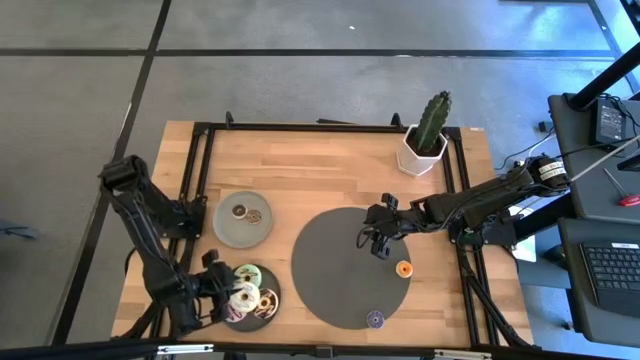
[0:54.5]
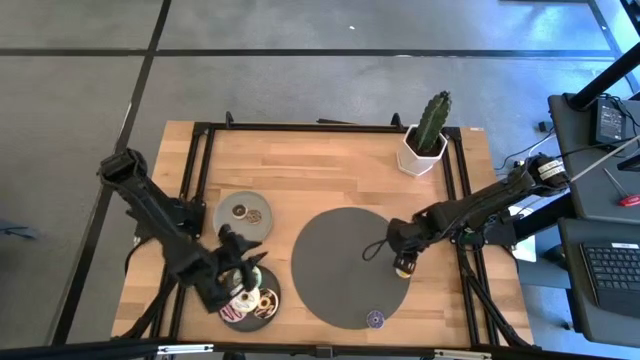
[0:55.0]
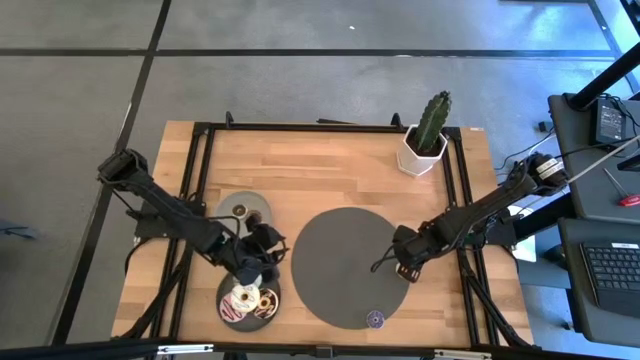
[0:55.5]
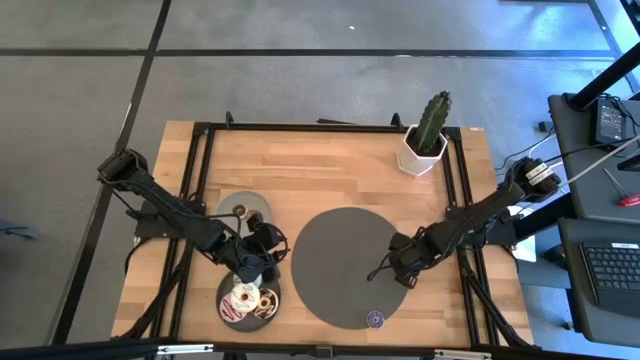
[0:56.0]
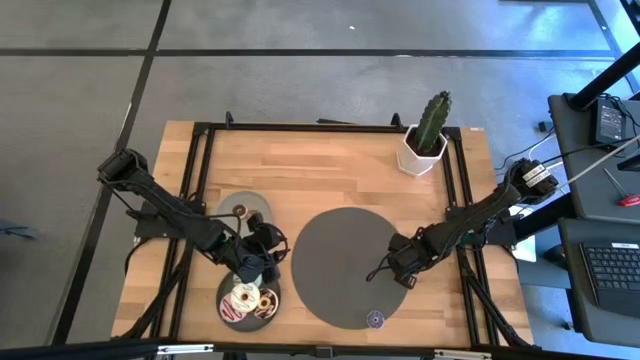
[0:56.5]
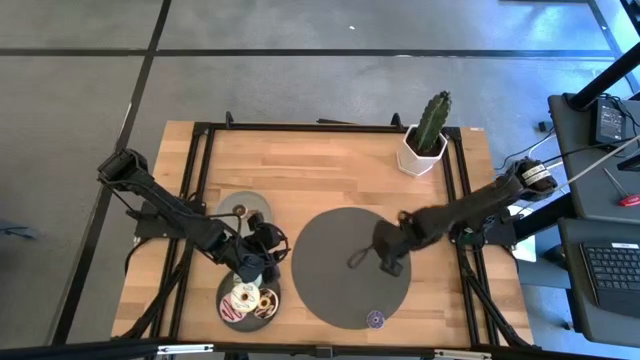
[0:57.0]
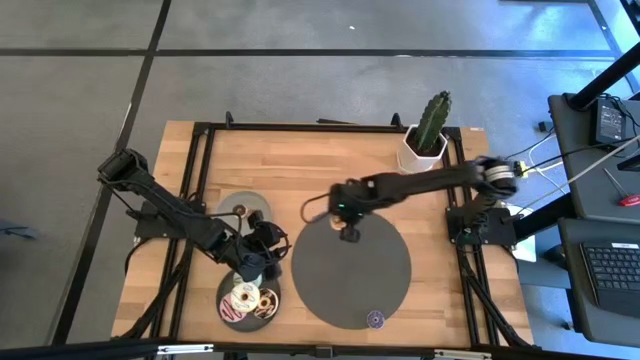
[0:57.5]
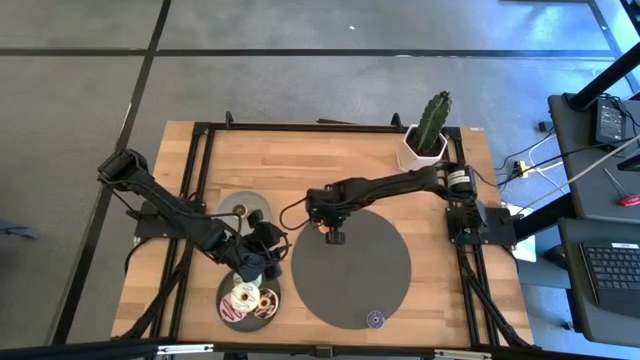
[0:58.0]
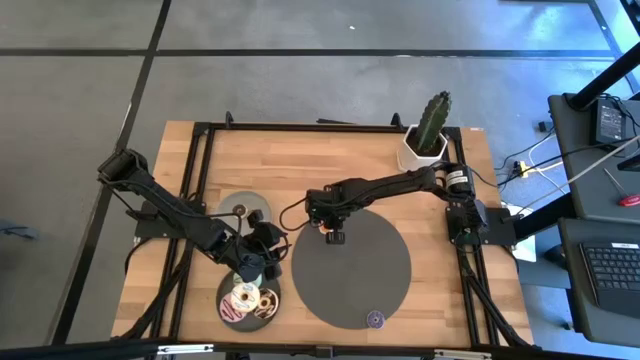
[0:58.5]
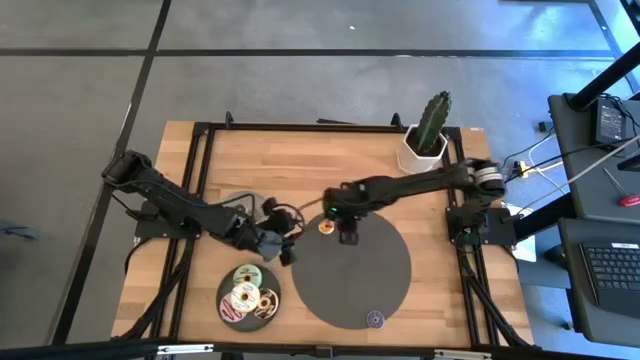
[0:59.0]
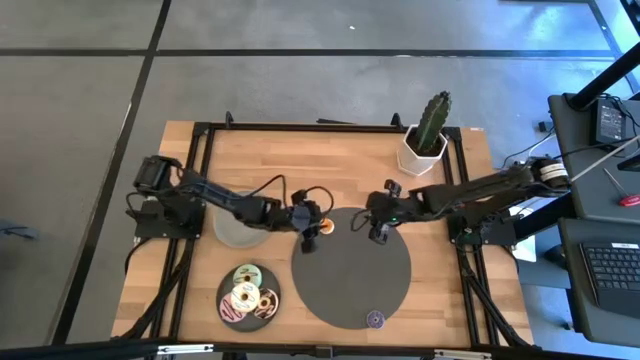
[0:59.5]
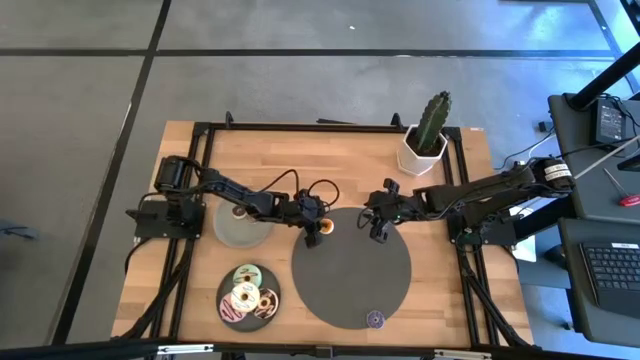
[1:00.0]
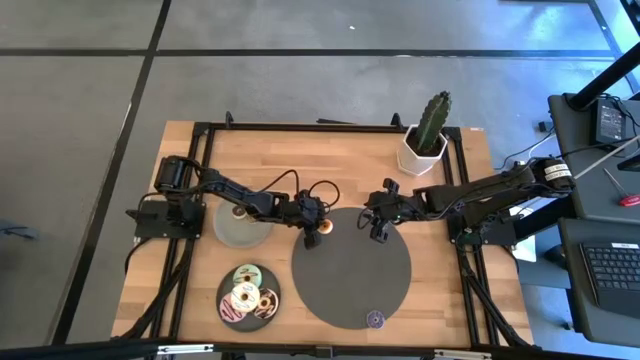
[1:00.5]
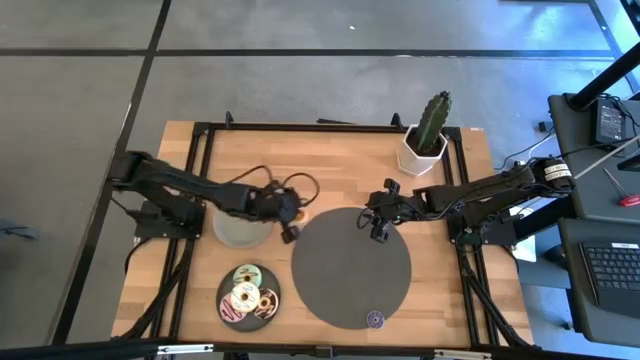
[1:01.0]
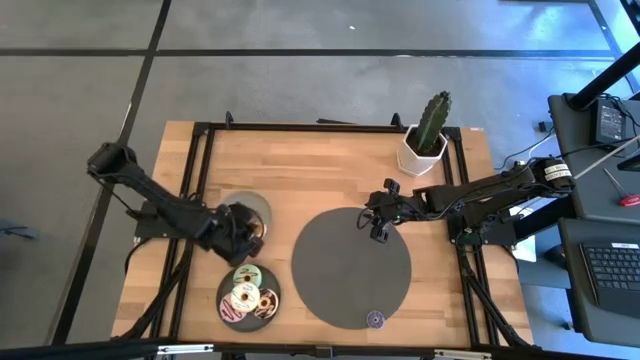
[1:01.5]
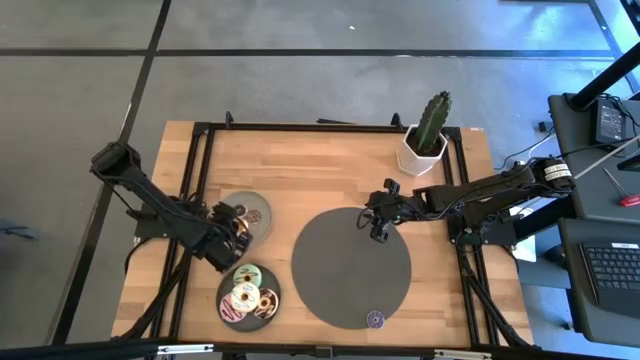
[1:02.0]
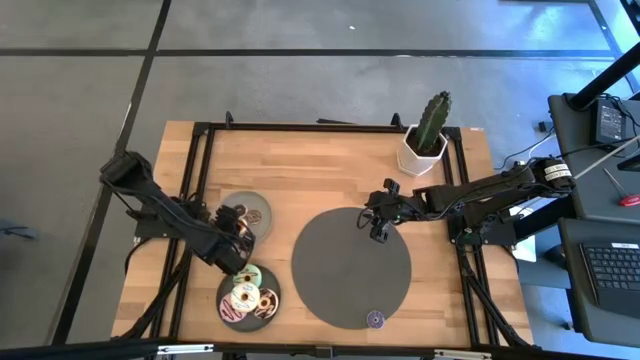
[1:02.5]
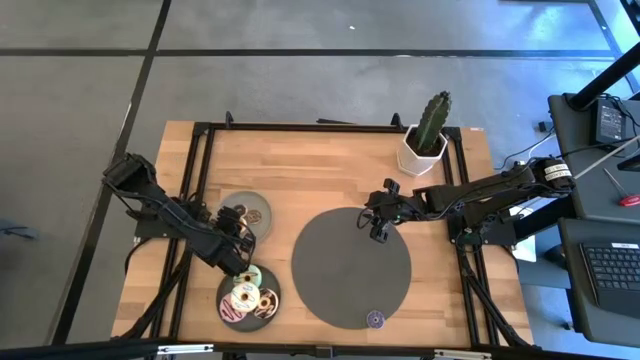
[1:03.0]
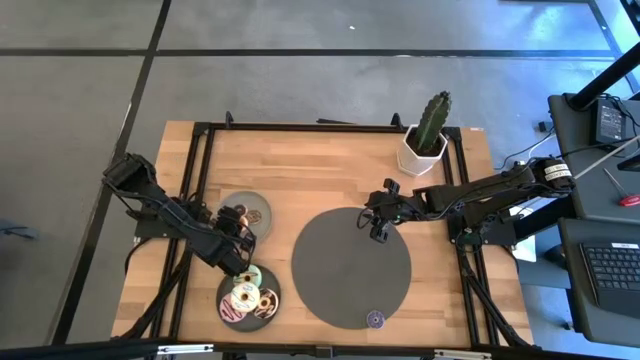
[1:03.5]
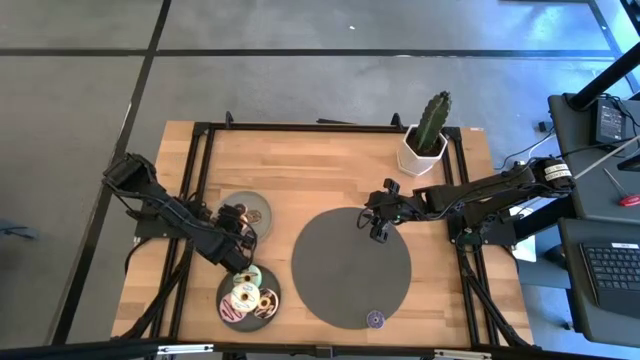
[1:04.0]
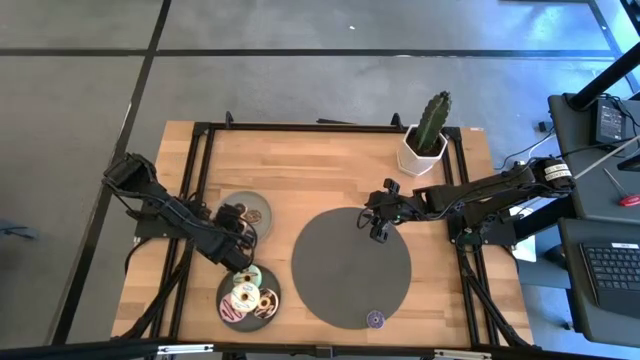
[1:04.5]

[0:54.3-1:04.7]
Task: Pick & Place donuts
Put the small yellow donut on the gray plate

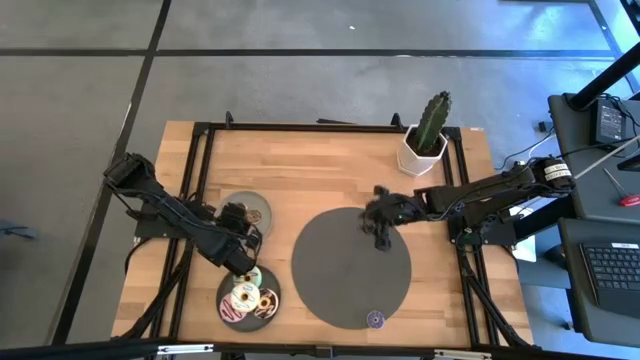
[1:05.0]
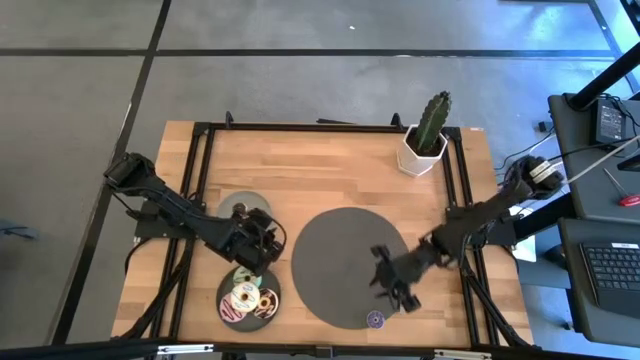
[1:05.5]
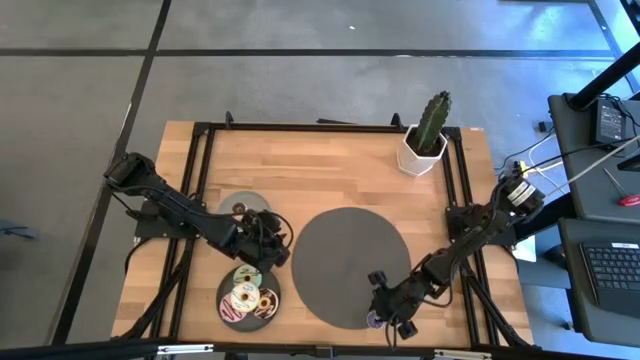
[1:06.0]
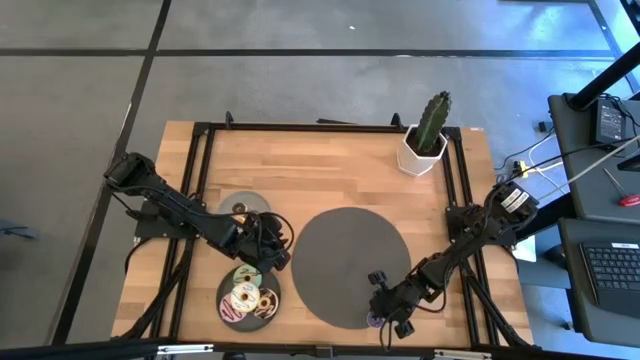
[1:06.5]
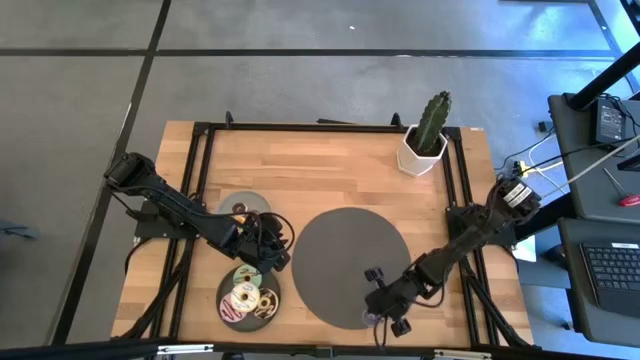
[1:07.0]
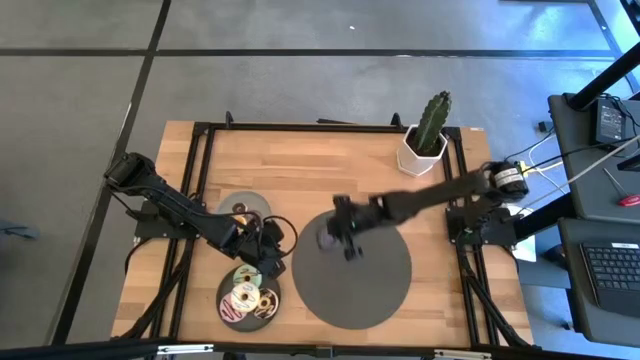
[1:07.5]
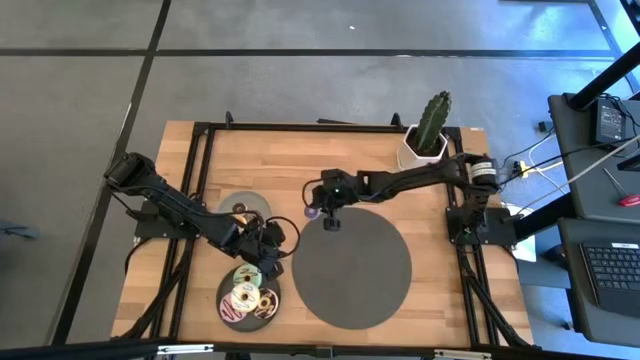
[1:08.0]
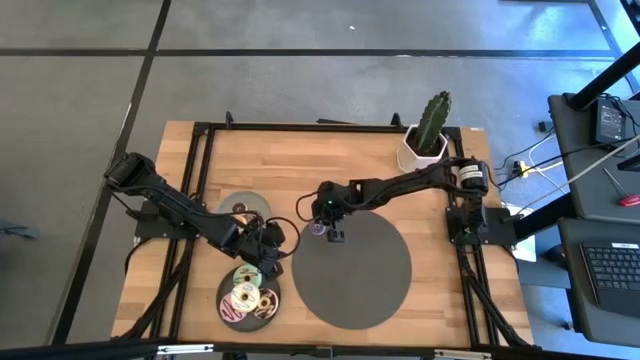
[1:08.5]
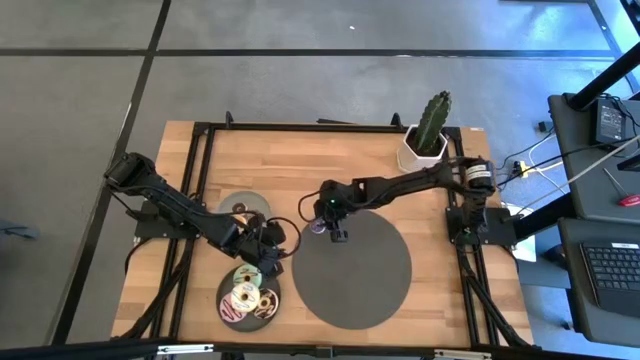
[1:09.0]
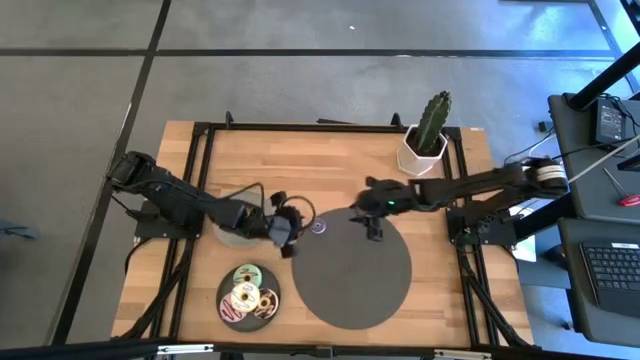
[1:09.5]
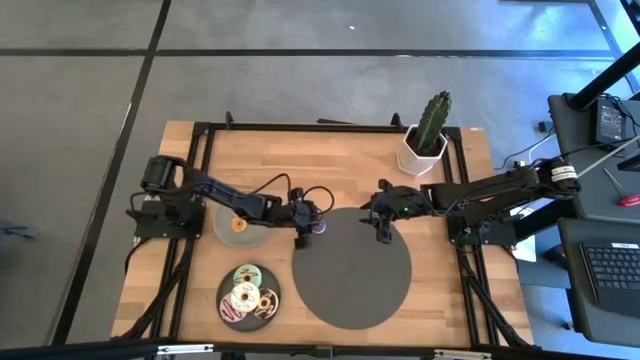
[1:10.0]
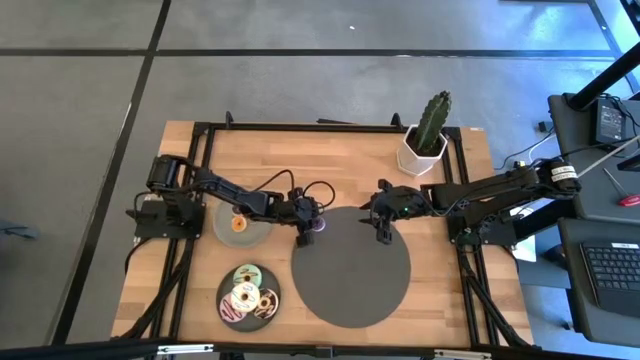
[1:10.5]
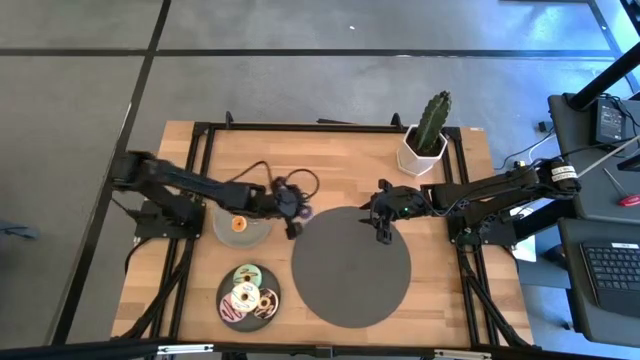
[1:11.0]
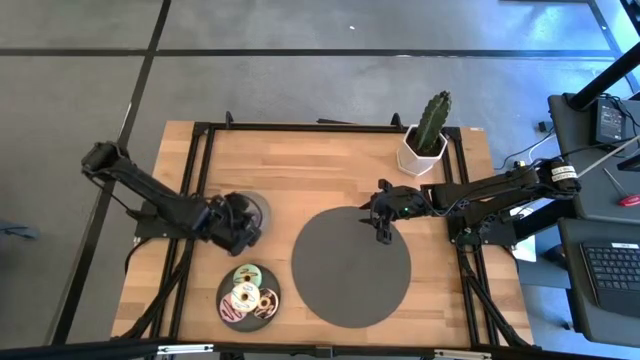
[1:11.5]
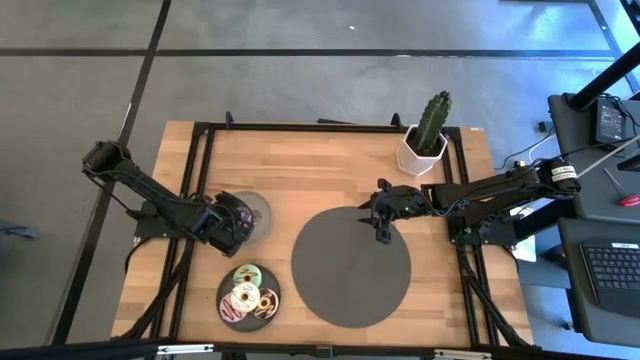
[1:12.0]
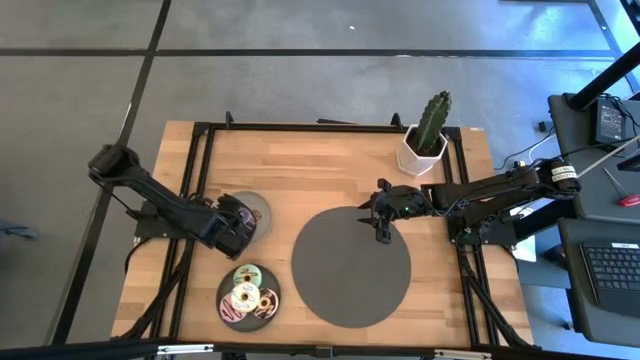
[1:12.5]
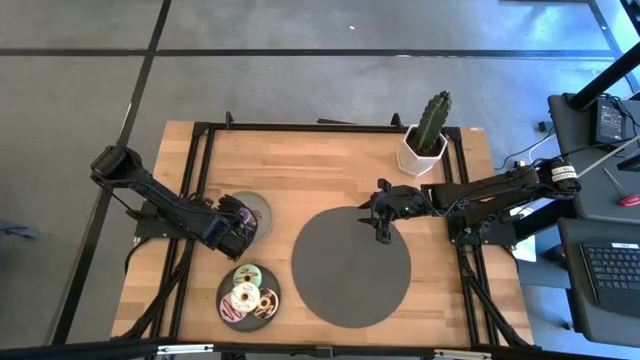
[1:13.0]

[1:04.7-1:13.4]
Put the small blue donut on the gray plate

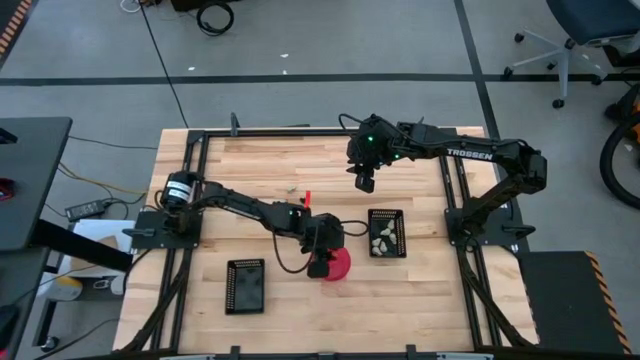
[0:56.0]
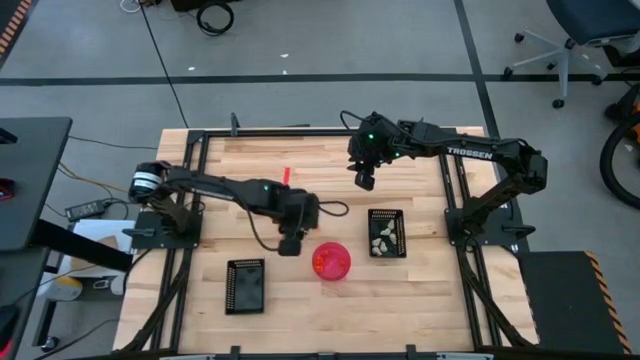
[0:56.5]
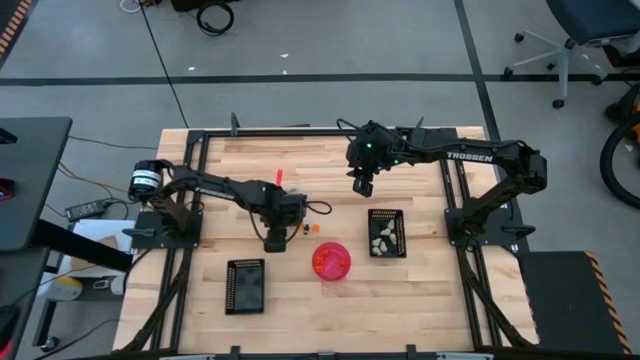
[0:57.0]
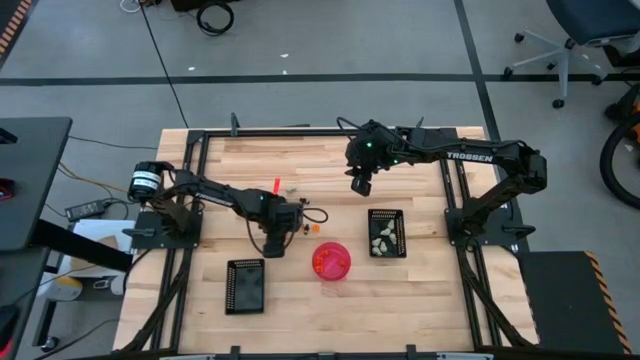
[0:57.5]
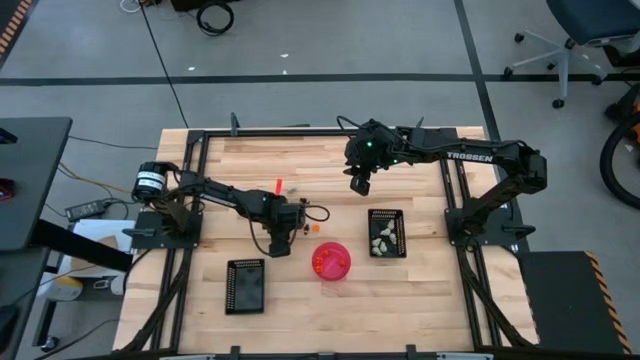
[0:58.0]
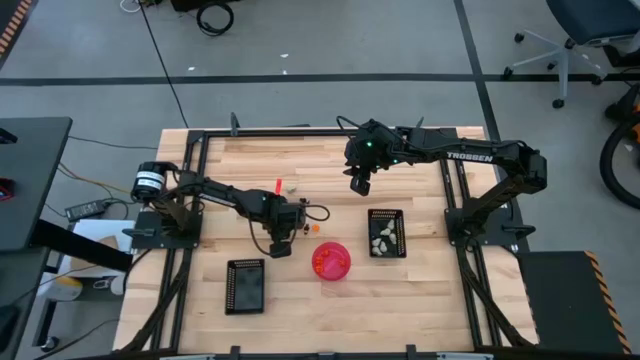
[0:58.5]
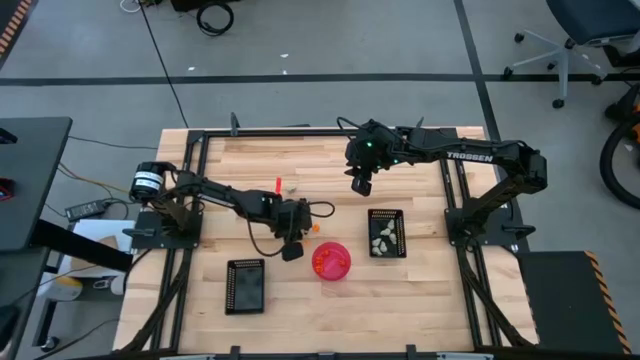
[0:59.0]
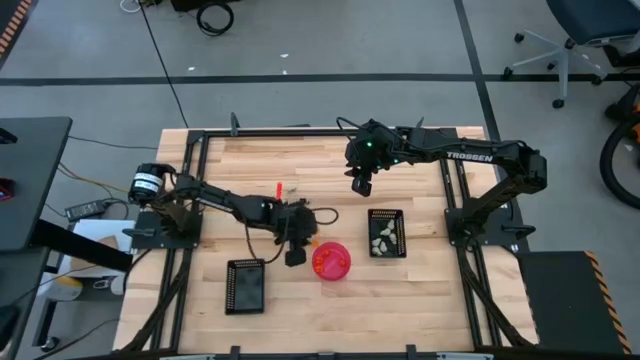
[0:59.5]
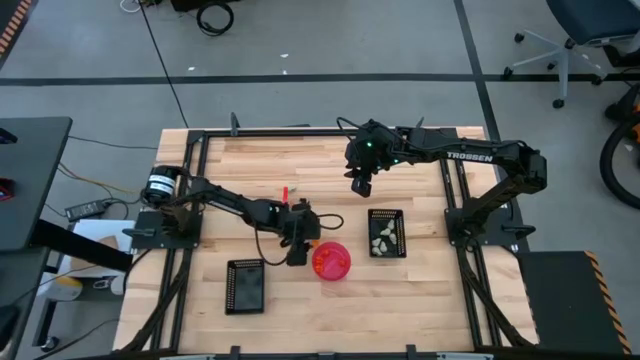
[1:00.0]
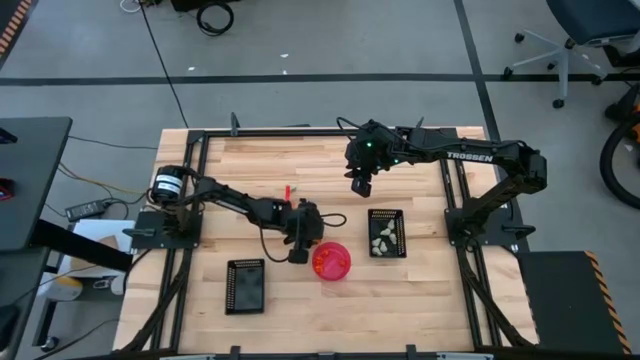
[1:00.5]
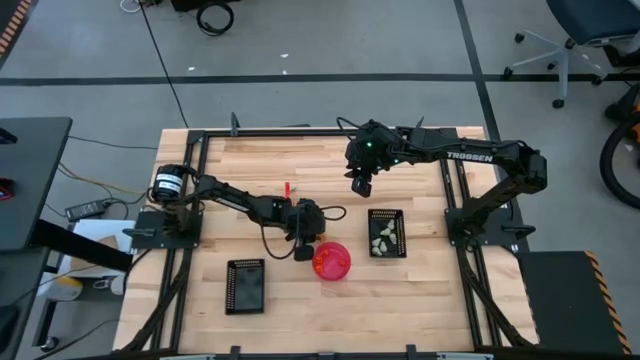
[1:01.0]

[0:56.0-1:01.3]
Task: Sort Halloween decoration
Put the orange pumpkin toy into the pink bowl
